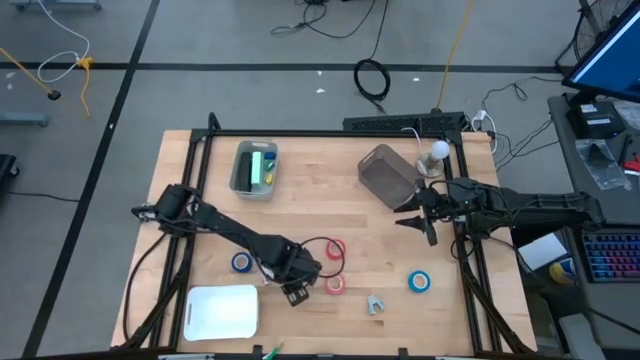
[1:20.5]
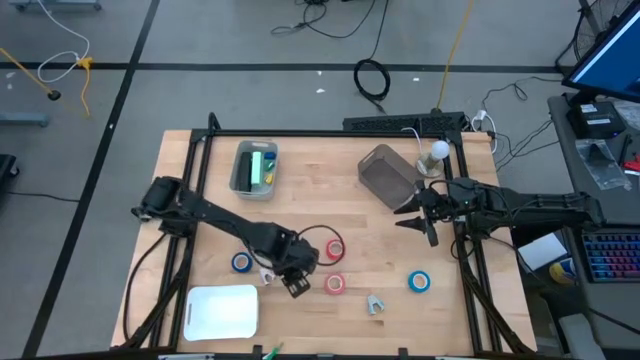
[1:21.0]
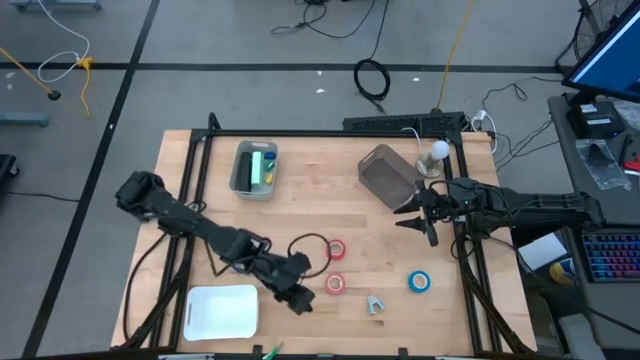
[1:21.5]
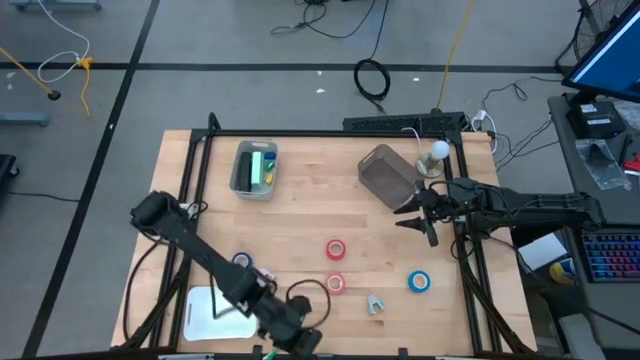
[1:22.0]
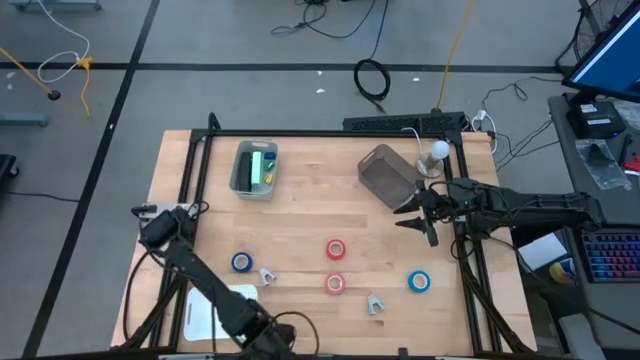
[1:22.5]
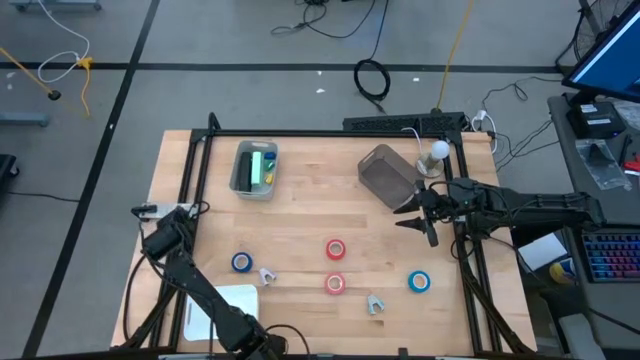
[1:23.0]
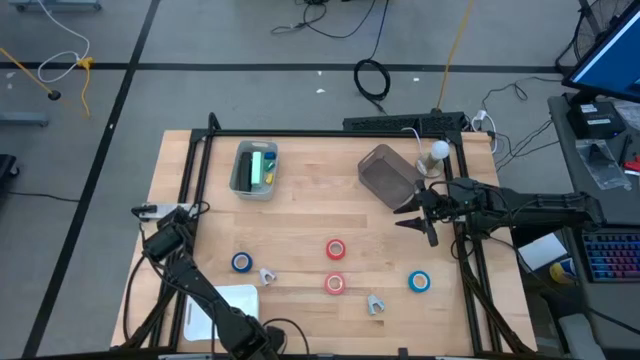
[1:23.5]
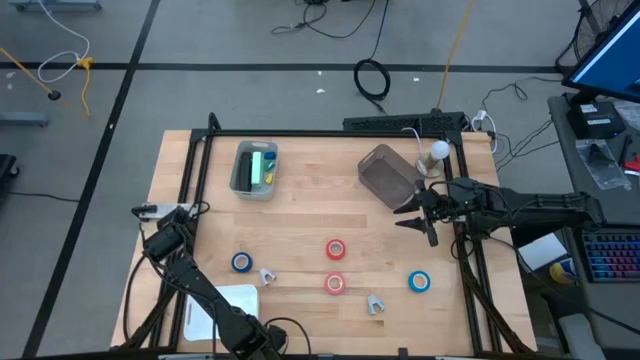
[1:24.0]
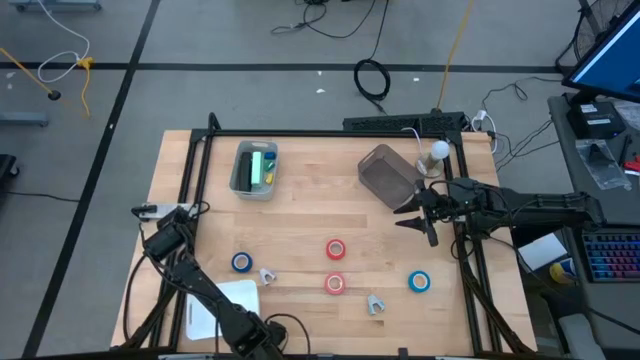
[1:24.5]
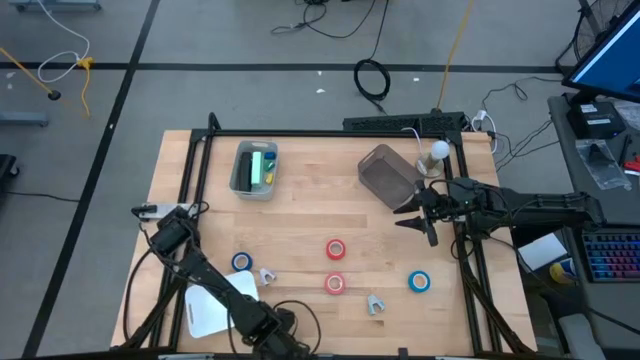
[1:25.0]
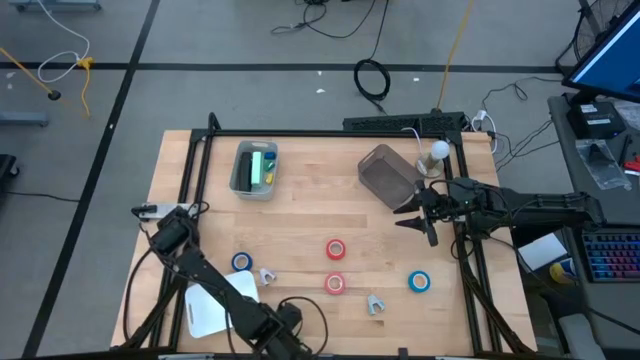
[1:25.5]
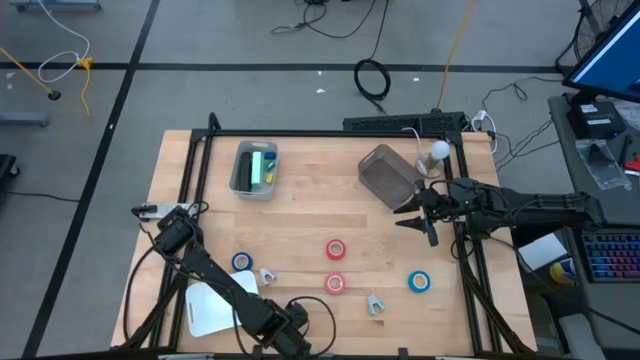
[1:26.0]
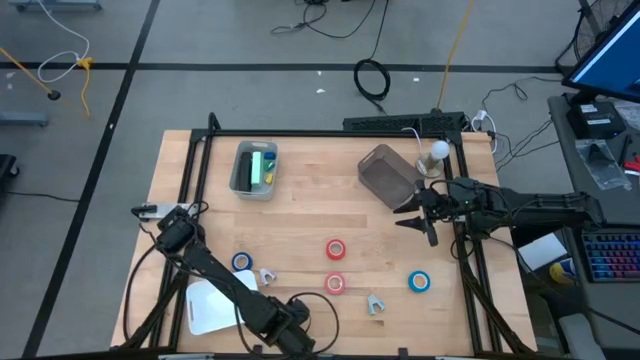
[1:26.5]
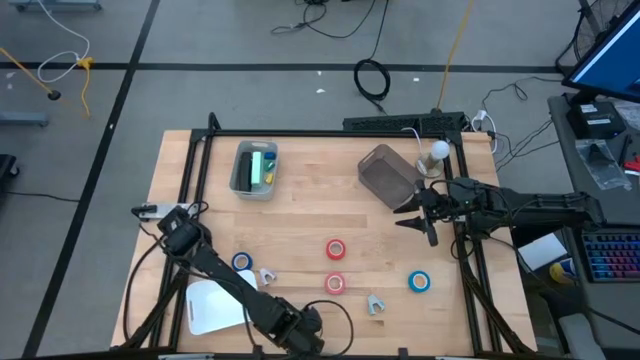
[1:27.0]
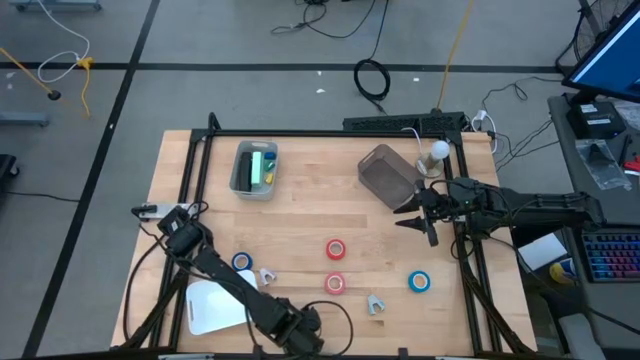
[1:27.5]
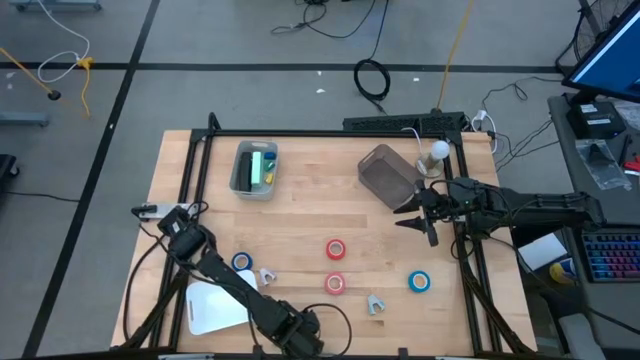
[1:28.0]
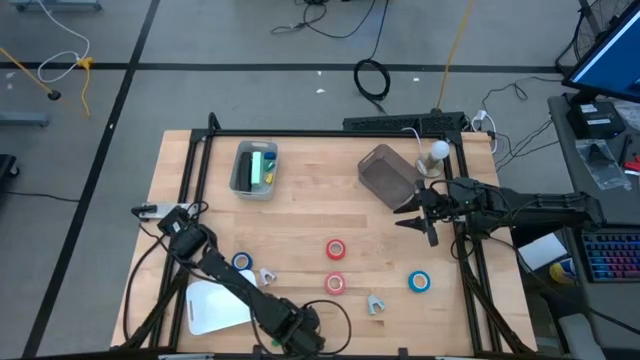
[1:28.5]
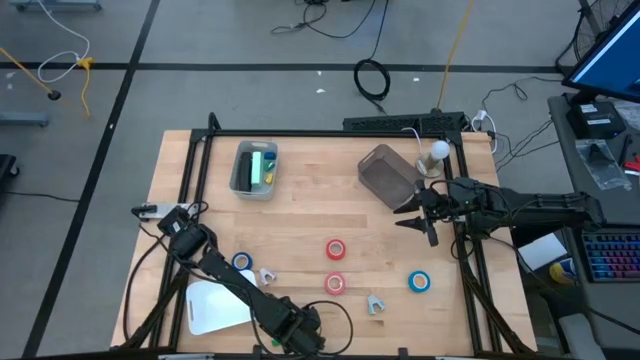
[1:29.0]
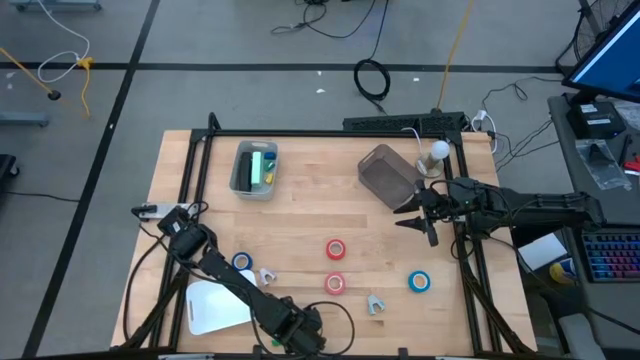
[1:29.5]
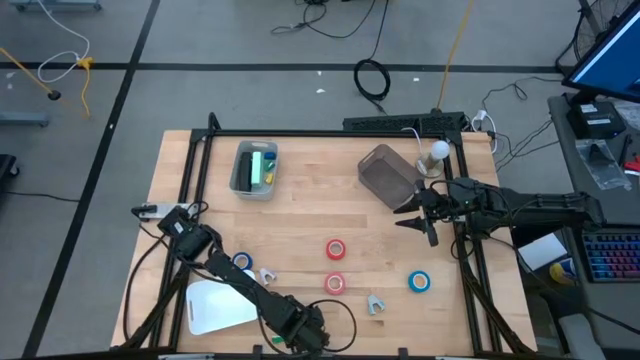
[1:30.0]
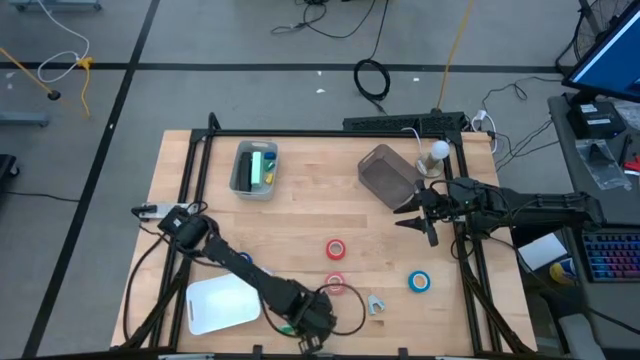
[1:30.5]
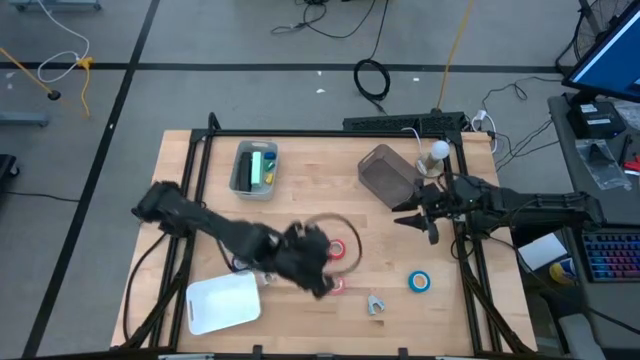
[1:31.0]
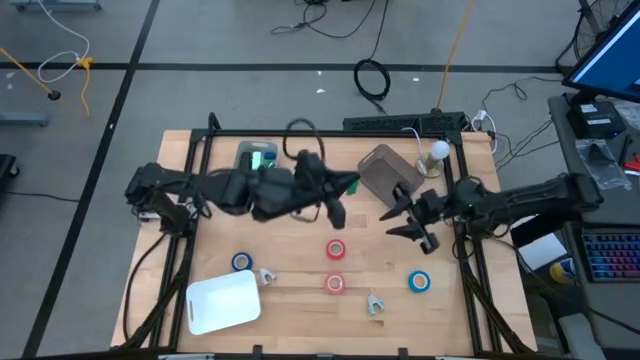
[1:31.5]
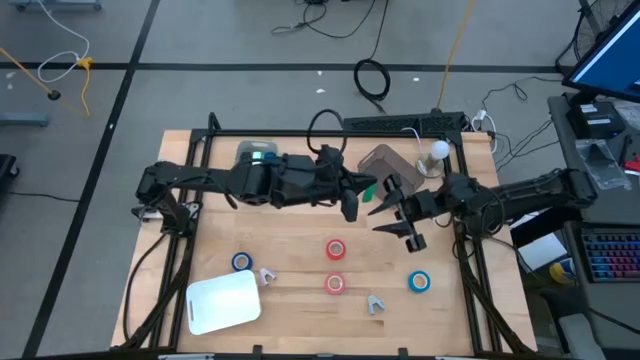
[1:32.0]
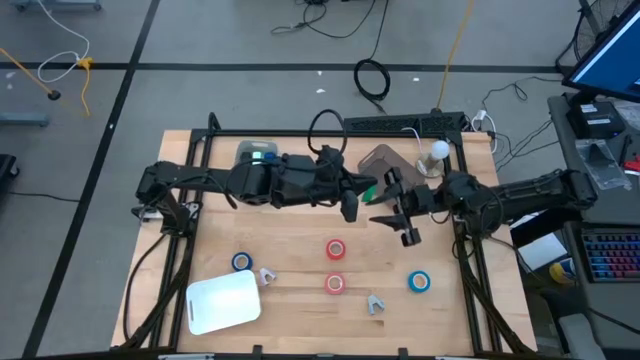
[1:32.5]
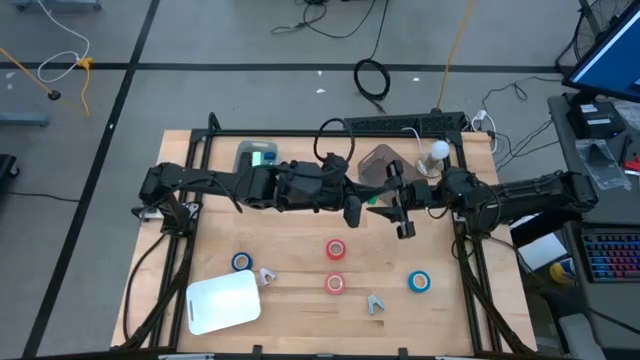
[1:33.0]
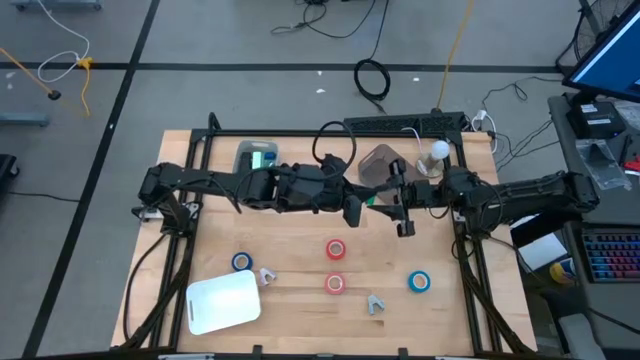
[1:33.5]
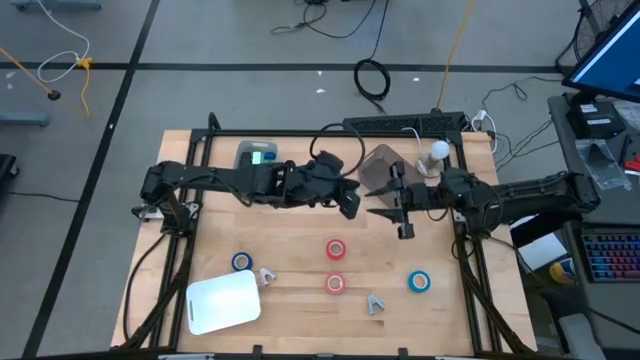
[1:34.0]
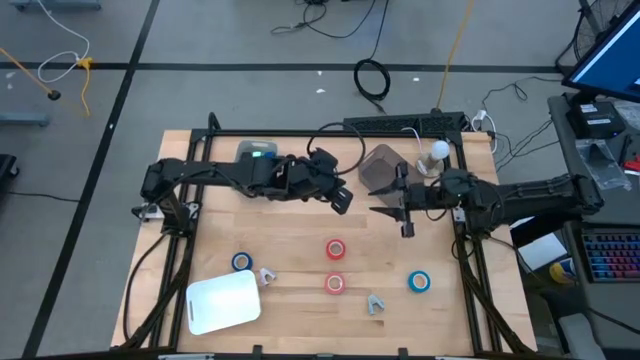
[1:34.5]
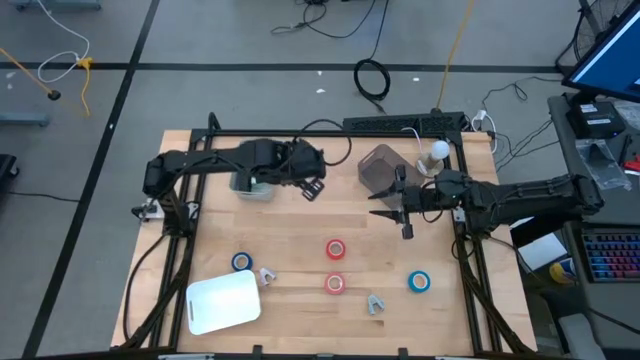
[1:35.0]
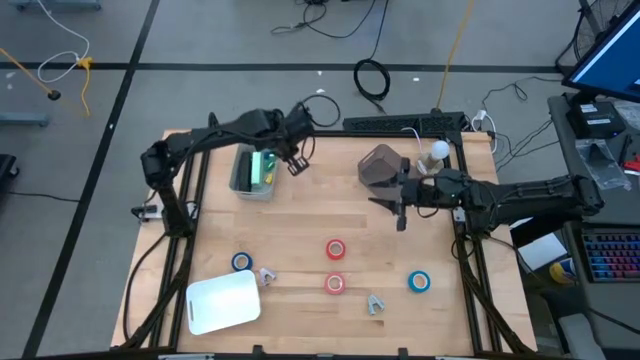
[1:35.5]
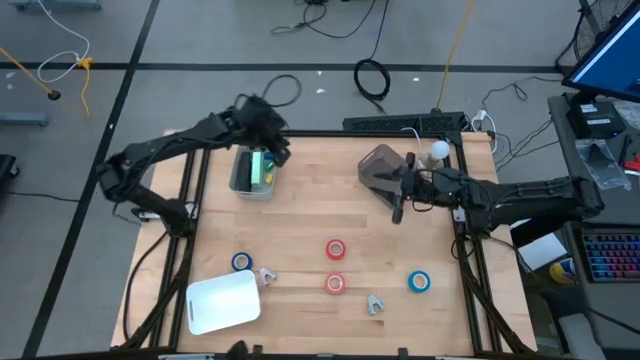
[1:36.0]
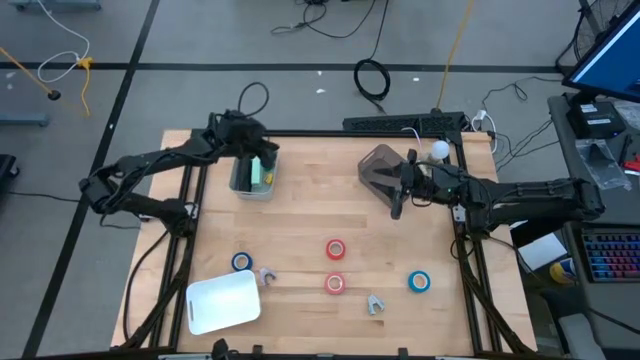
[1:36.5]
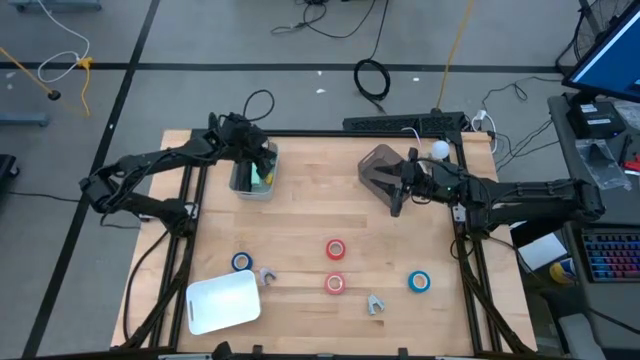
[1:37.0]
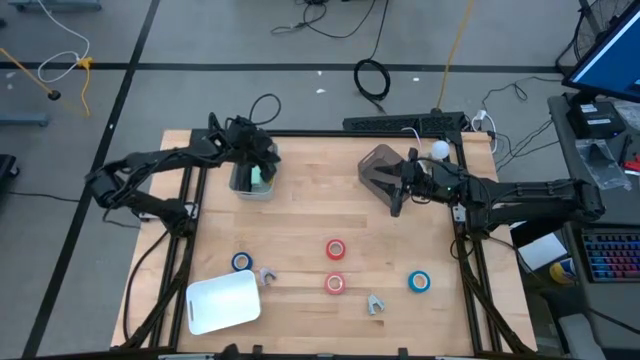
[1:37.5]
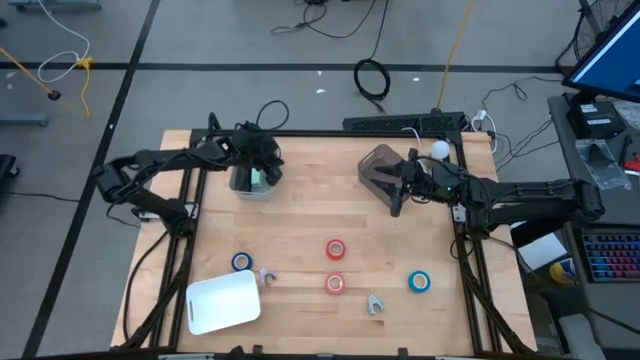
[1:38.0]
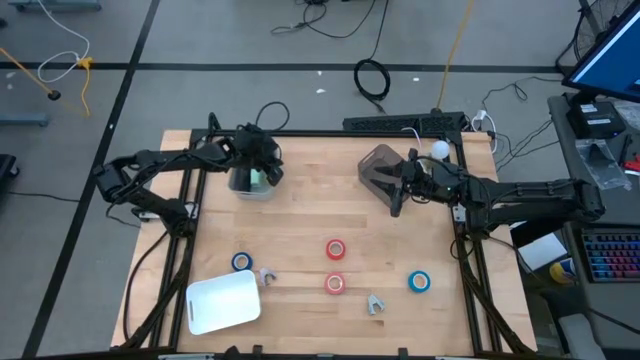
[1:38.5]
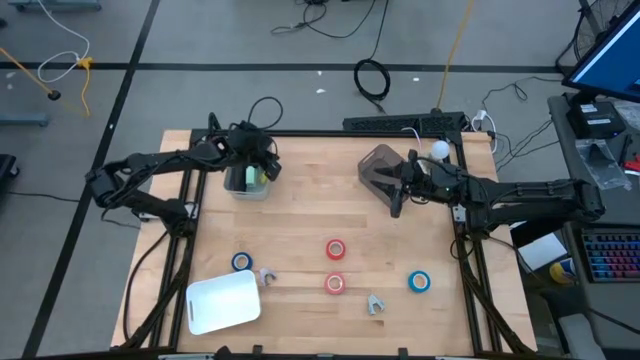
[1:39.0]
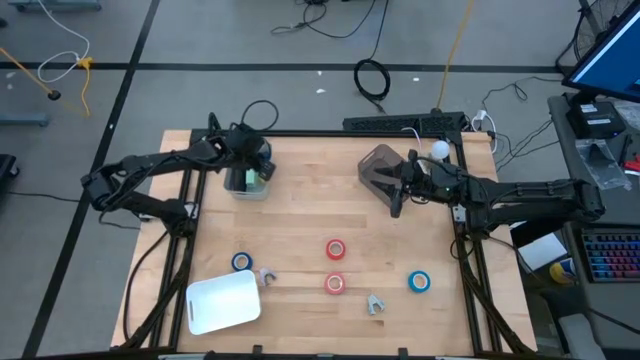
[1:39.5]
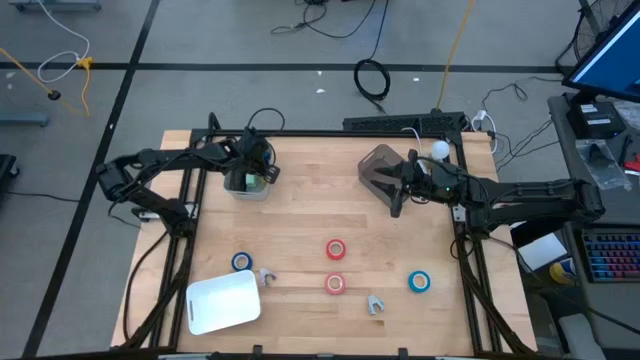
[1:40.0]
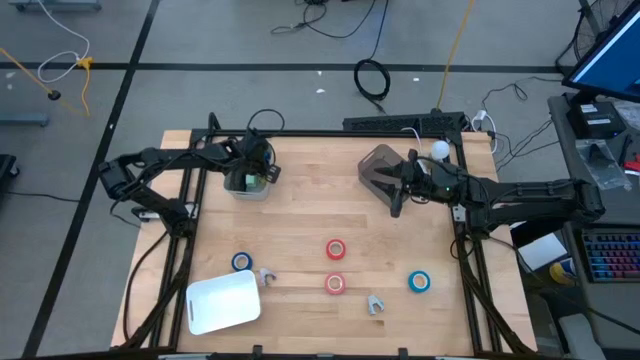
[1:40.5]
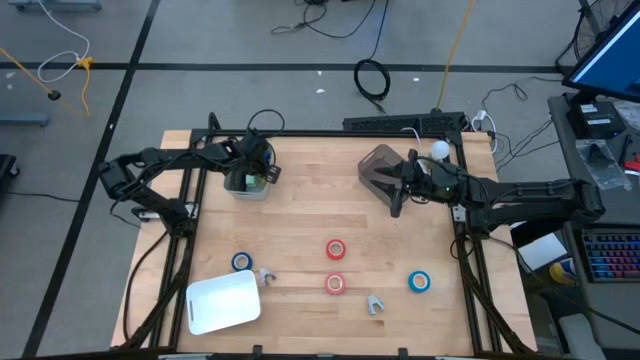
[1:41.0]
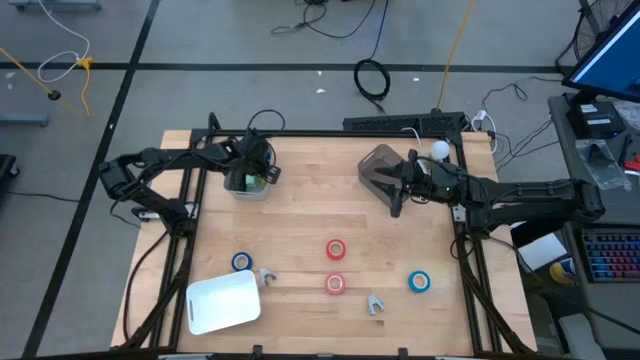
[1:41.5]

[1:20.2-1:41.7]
Task: Pick and place Stapler, Stapler remover, tape
Put the green stapler into the gray bin
